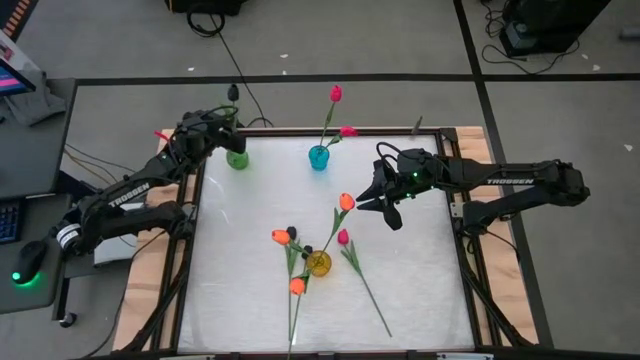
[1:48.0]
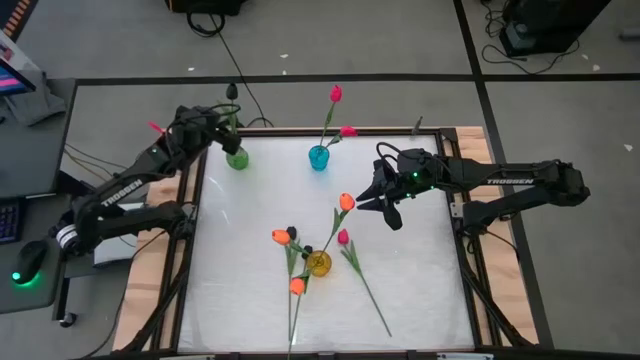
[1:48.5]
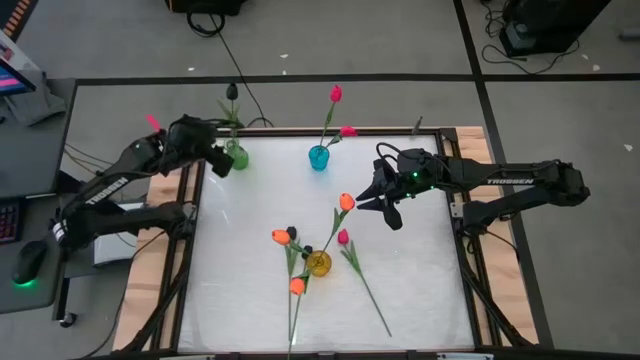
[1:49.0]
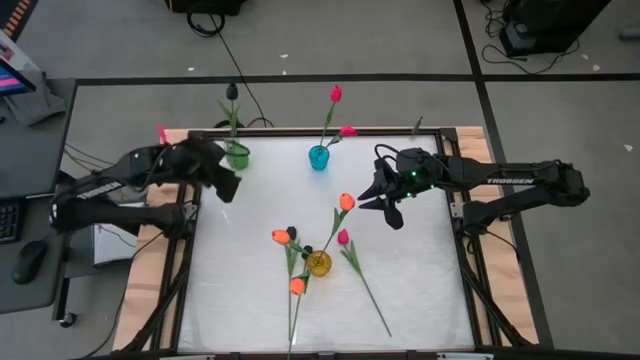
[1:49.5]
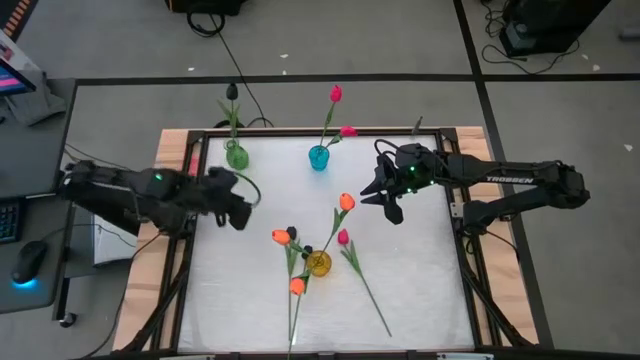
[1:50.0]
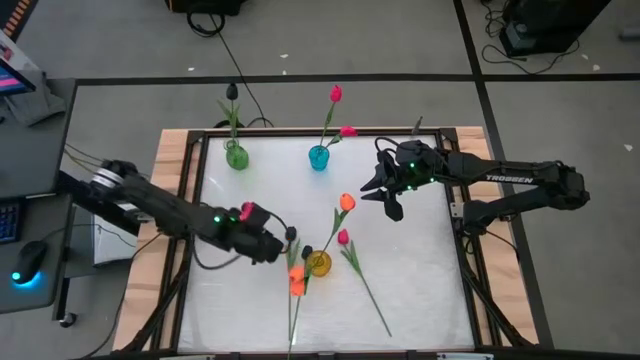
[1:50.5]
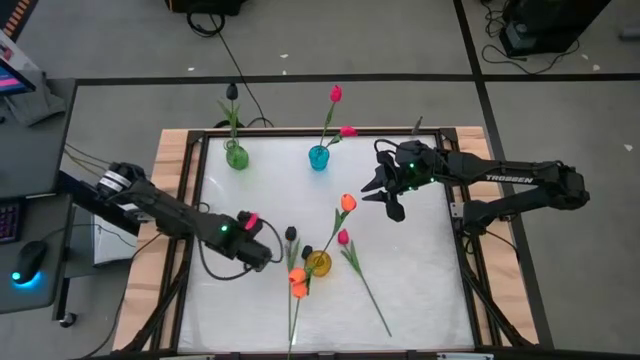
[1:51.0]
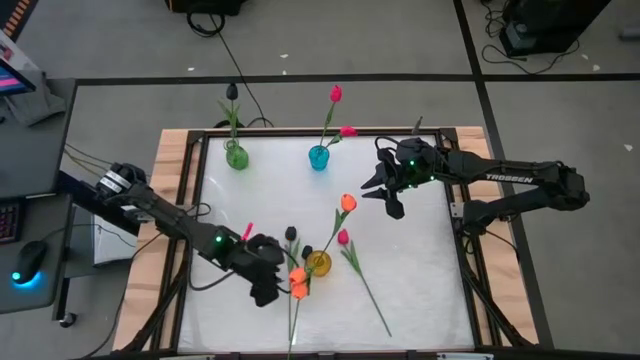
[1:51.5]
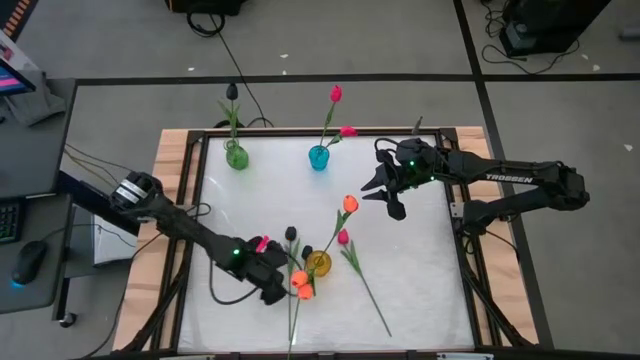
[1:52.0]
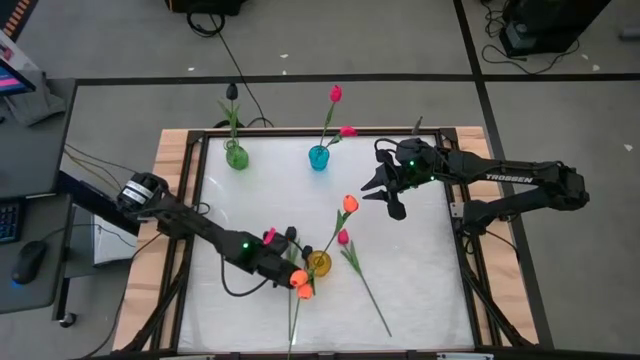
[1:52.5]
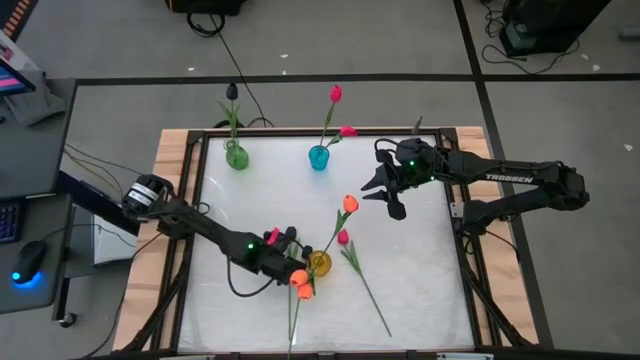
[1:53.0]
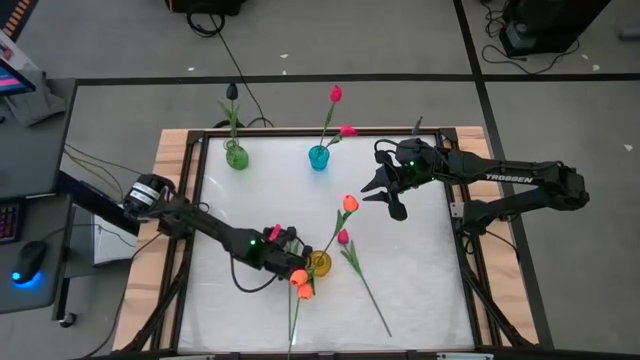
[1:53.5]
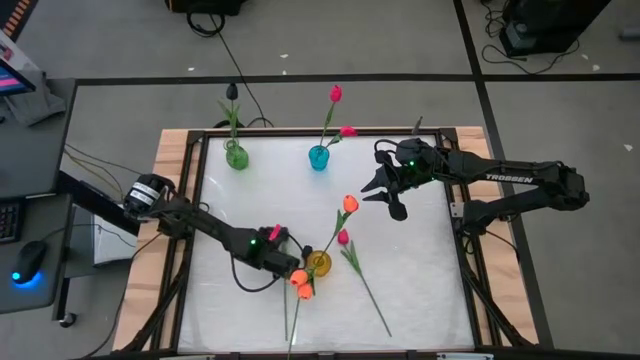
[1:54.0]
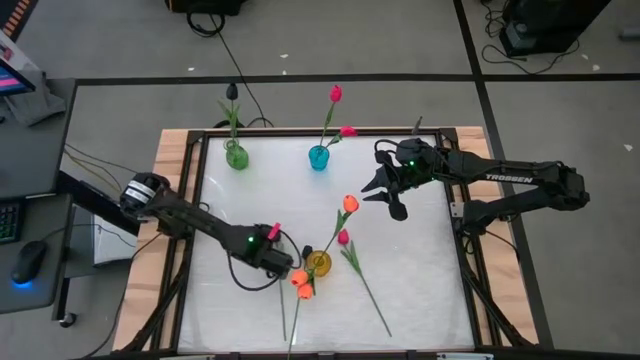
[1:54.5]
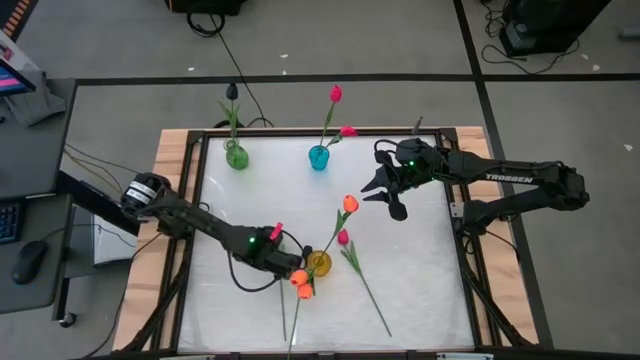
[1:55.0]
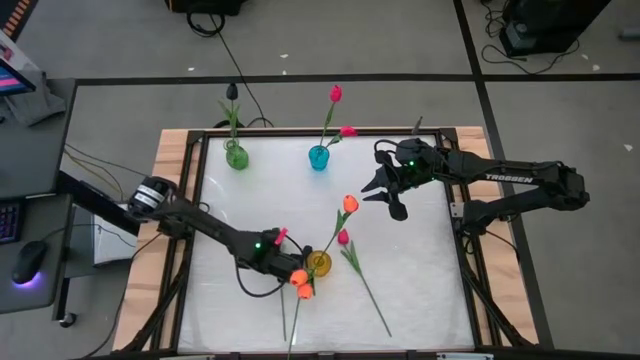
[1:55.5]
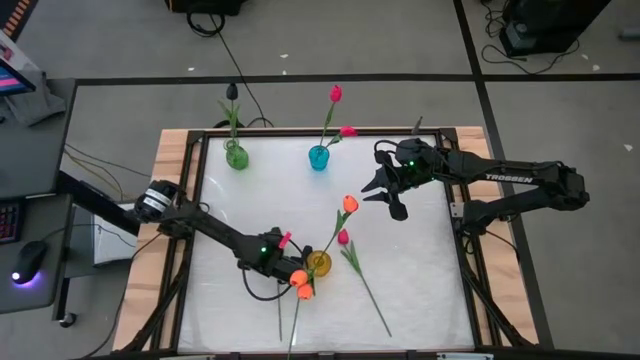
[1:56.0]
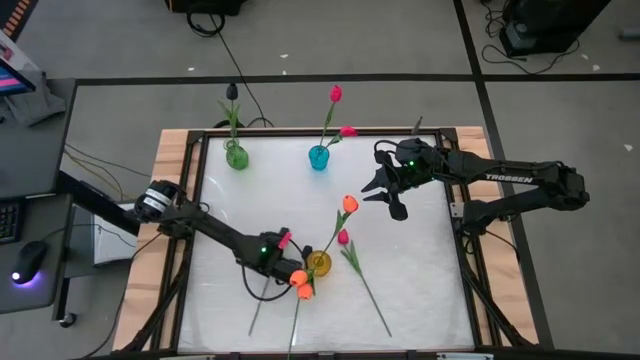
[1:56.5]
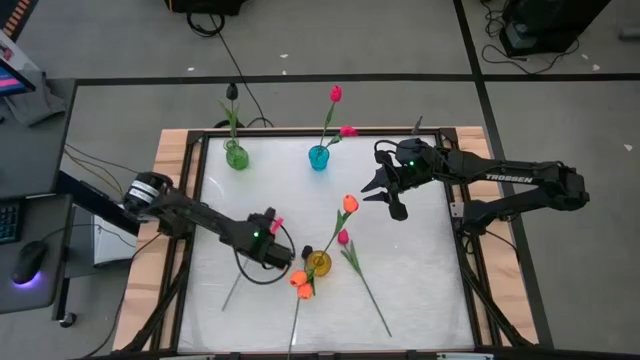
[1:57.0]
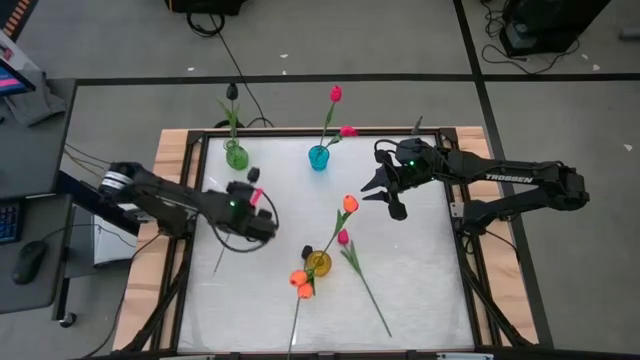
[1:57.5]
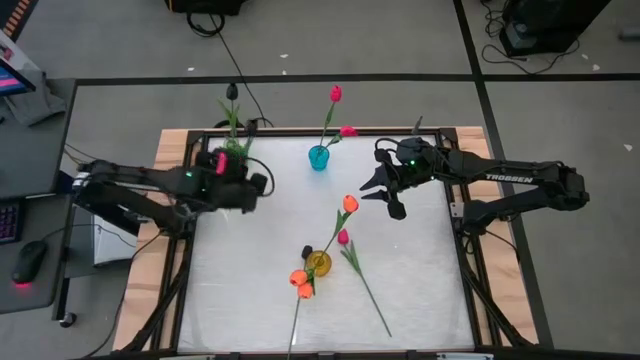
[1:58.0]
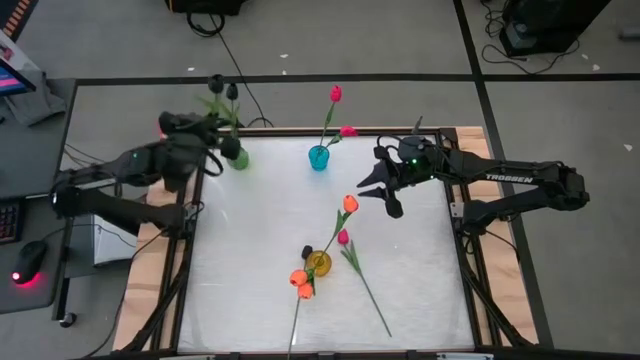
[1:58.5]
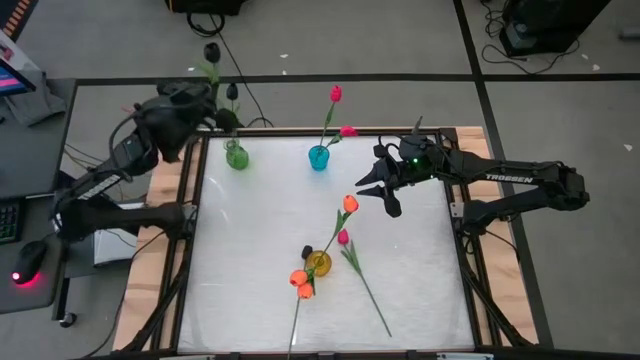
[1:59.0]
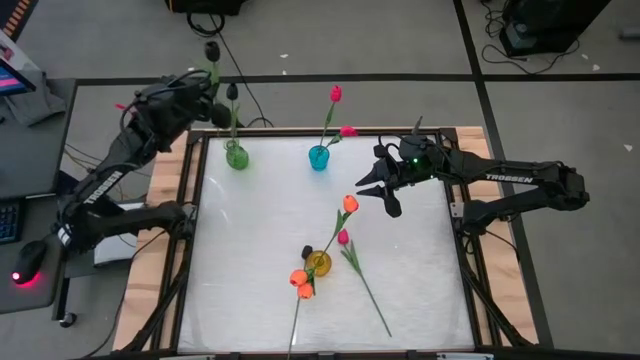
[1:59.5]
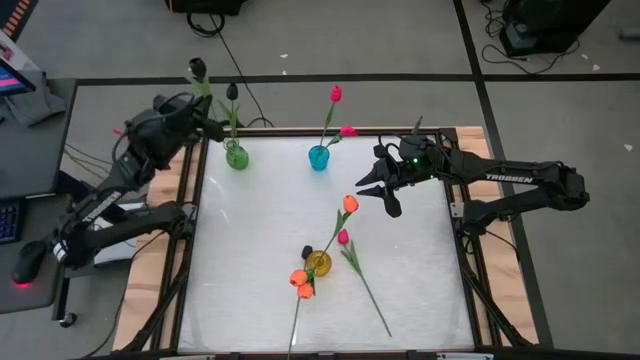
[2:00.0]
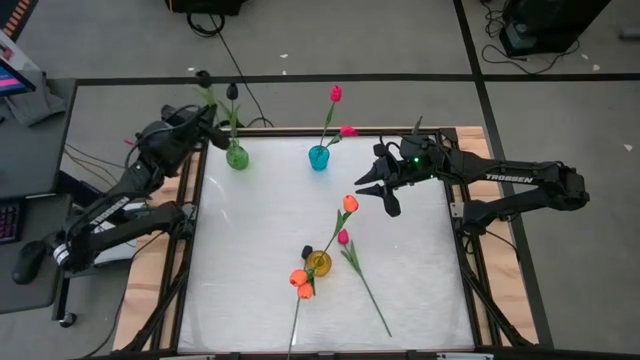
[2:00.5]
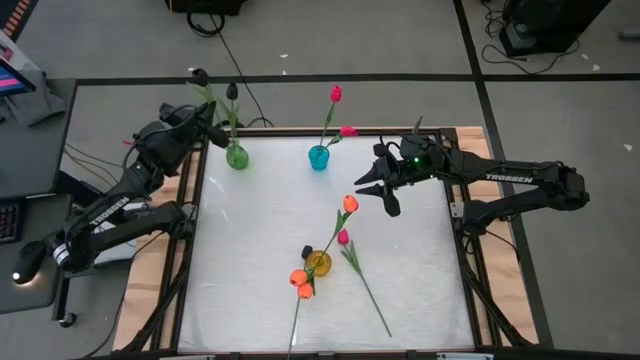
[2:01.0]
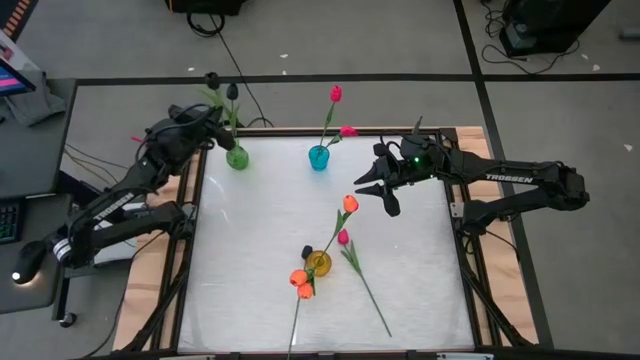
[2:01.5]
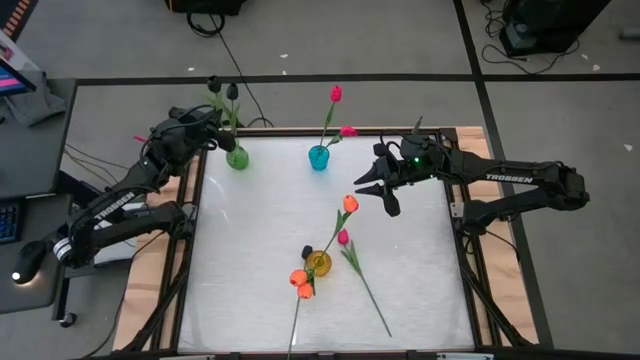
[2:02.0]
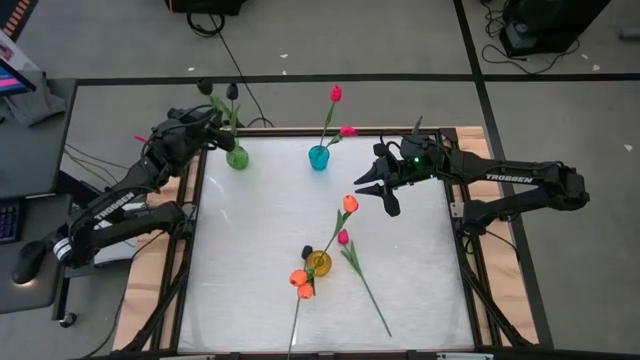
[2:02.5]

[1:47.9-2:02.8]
Task: Sort flowers into vase by color
Put the left black flower into the green vase

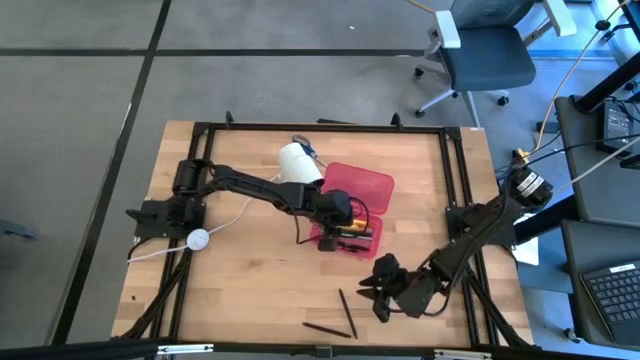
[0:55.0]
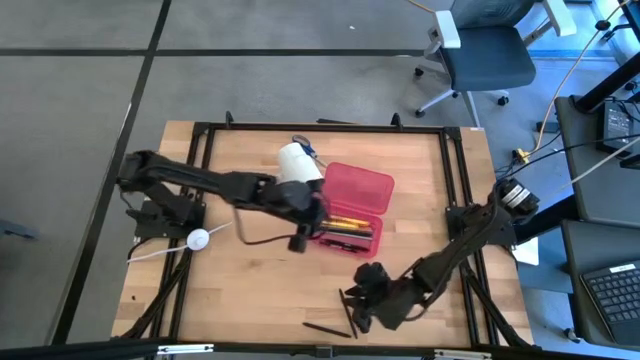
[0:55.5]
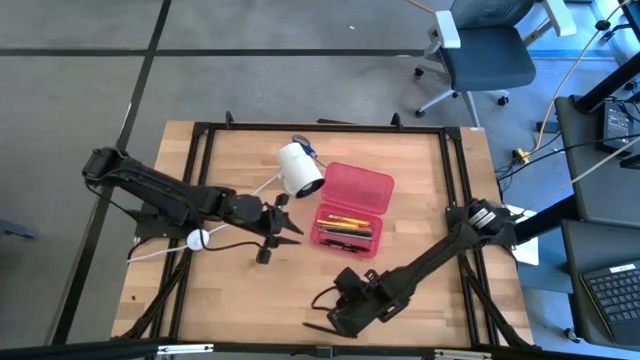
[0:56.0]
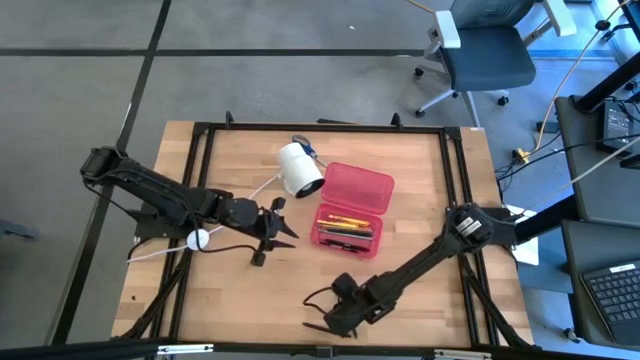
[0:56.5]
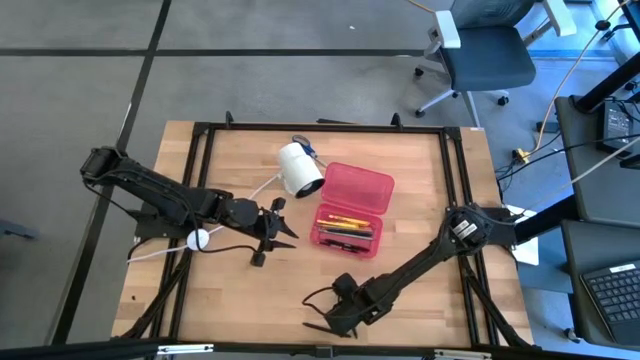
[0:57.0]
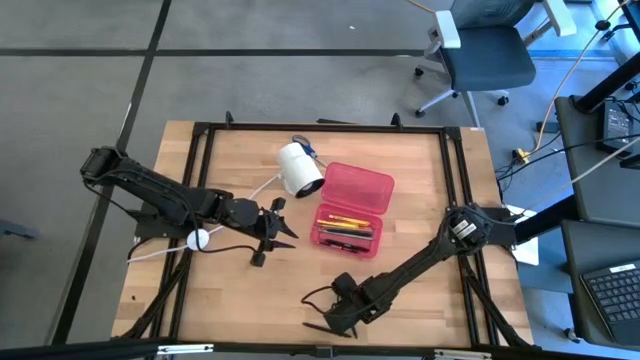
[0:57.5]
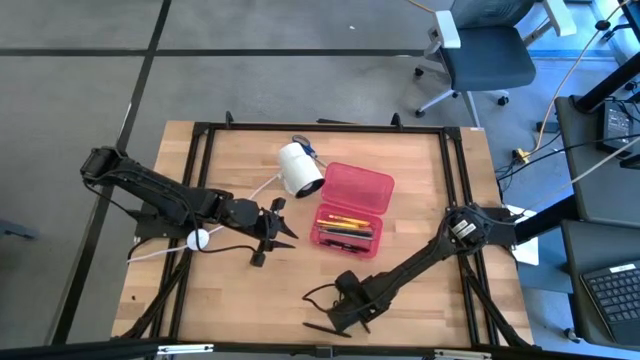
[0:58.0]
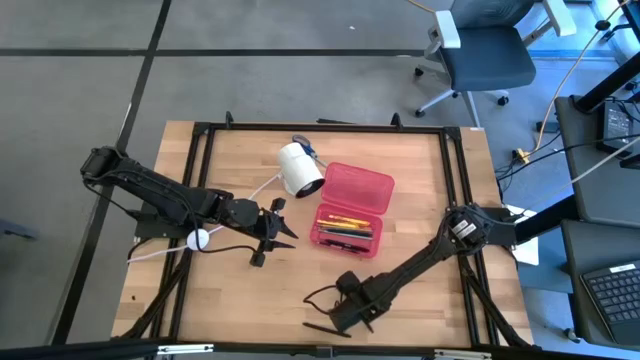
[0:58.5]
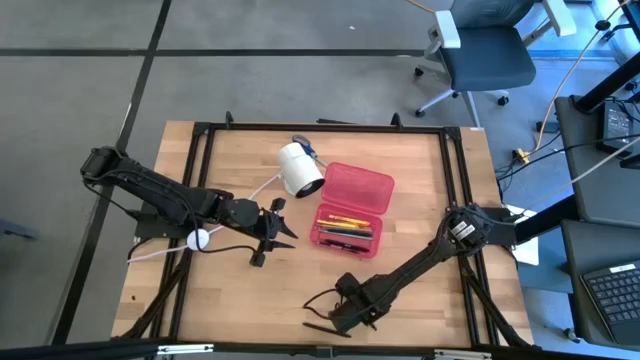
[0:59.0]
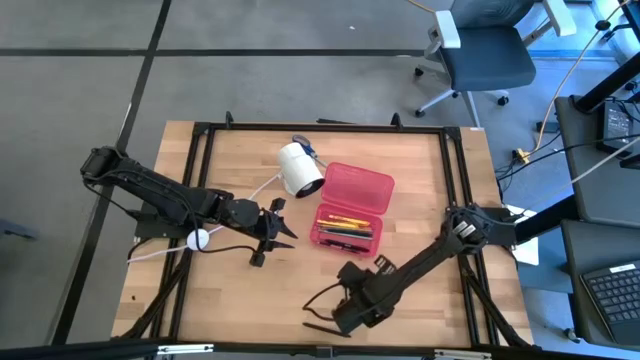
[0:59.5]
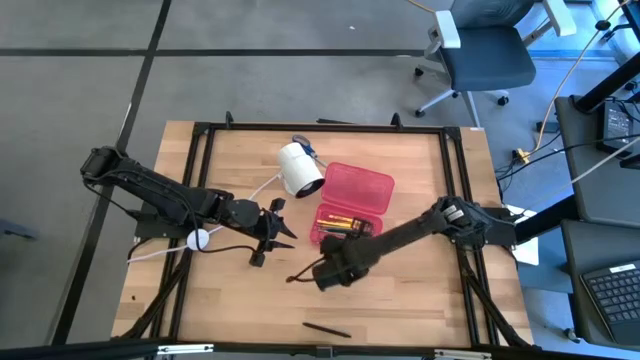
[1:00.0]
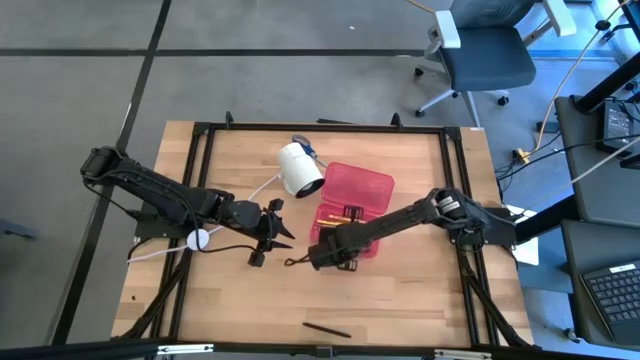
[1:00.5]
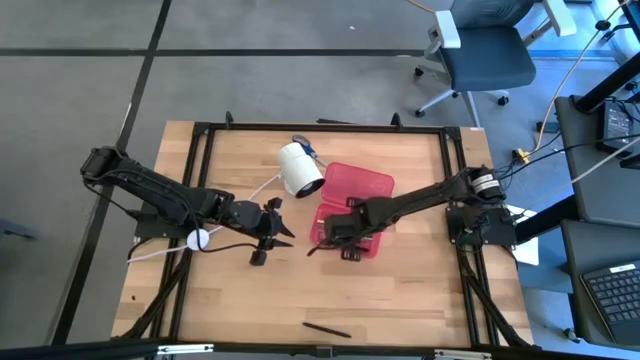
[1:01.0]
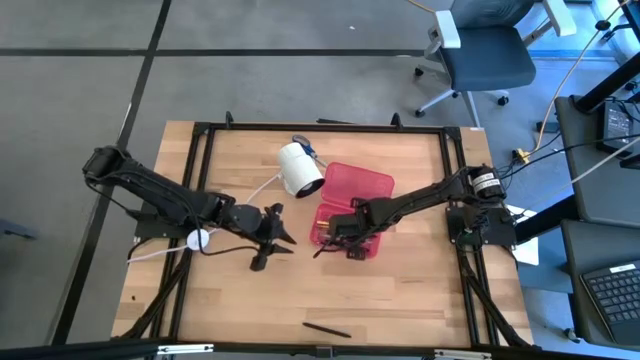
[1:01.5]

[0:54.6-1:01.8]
Task: Pick & place school supplies into a supply box
Put the black pen into the pink supply box
